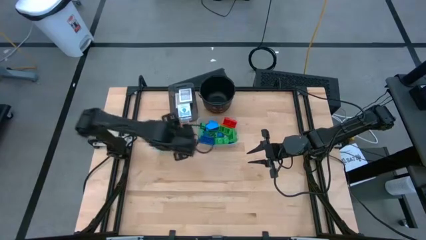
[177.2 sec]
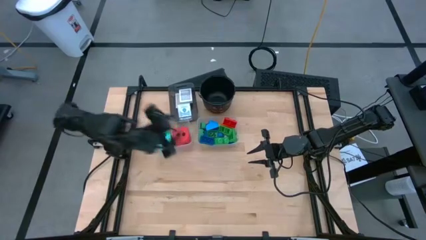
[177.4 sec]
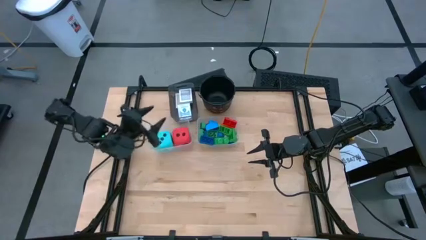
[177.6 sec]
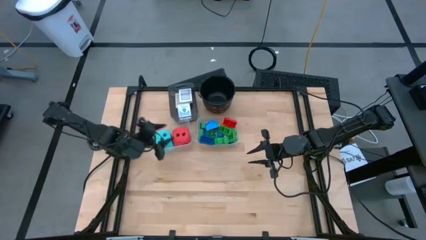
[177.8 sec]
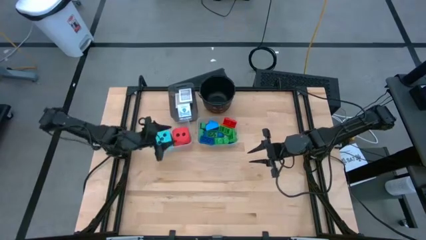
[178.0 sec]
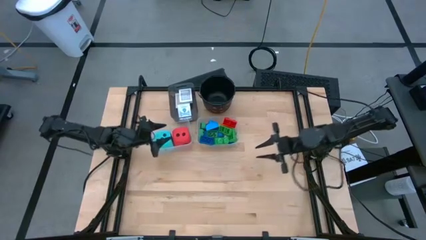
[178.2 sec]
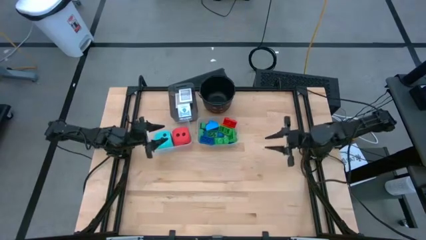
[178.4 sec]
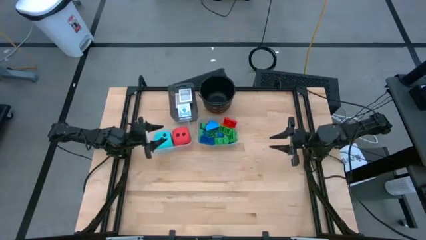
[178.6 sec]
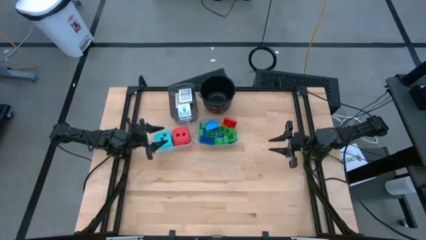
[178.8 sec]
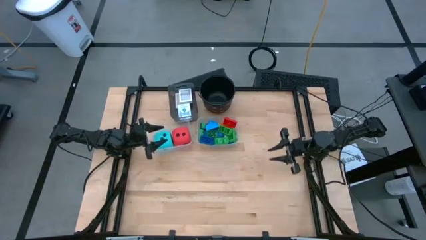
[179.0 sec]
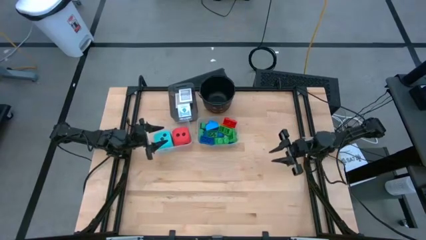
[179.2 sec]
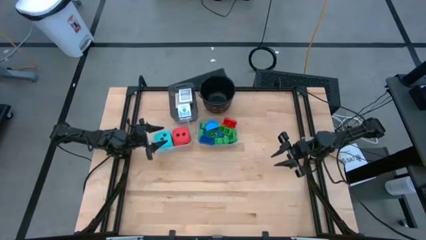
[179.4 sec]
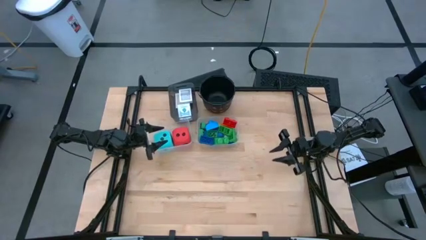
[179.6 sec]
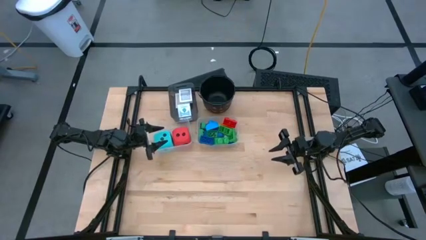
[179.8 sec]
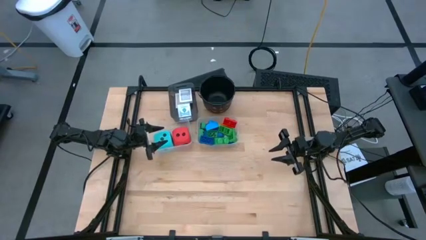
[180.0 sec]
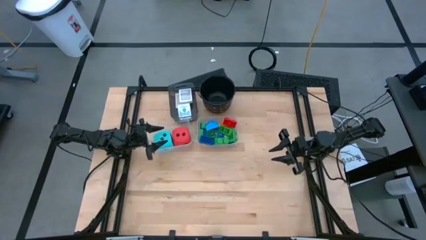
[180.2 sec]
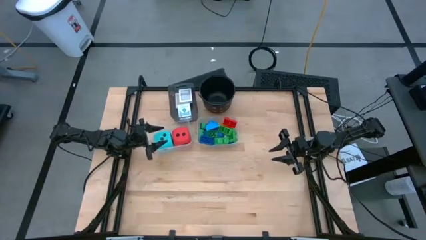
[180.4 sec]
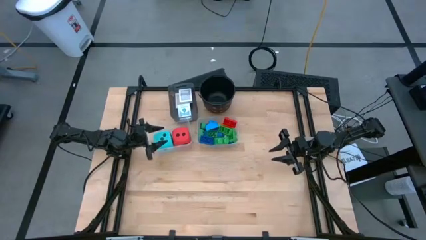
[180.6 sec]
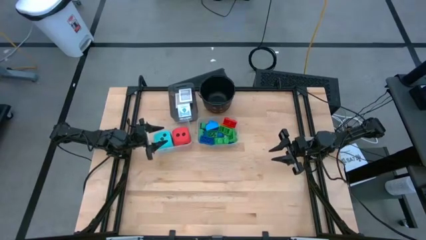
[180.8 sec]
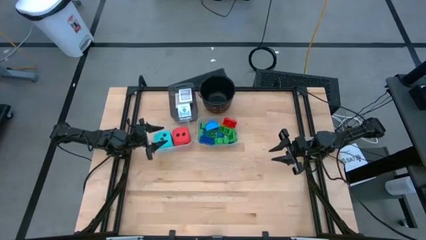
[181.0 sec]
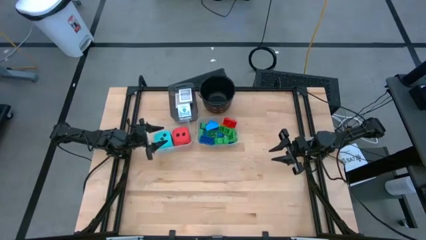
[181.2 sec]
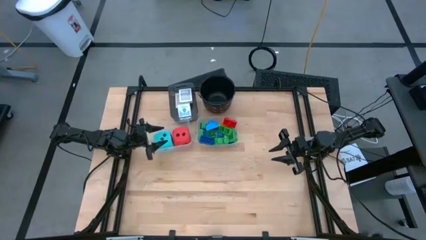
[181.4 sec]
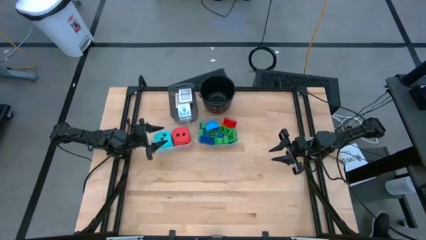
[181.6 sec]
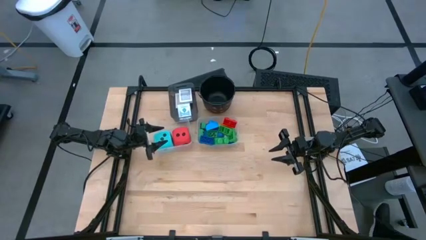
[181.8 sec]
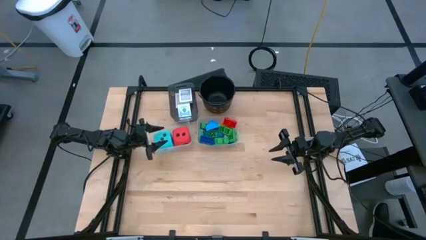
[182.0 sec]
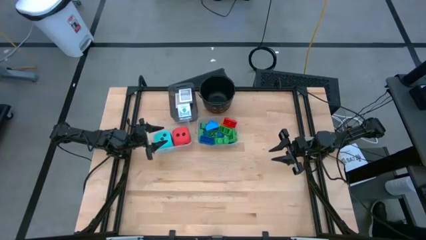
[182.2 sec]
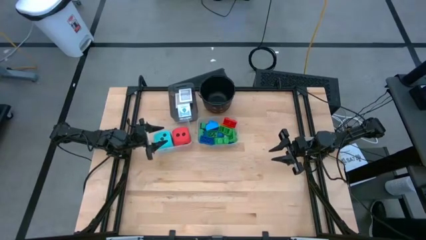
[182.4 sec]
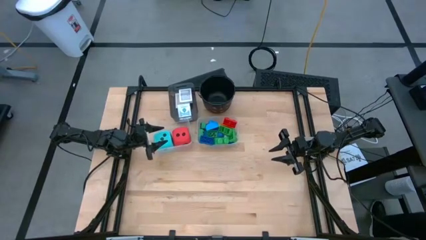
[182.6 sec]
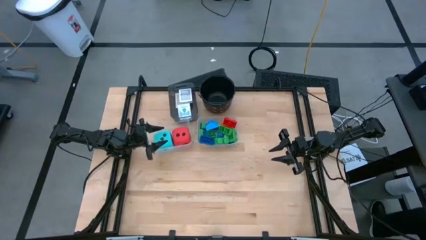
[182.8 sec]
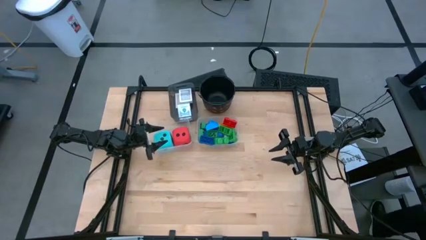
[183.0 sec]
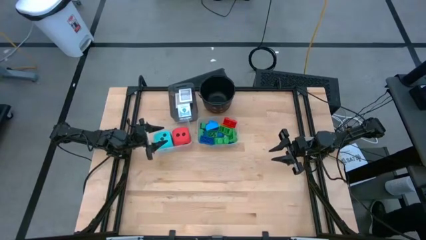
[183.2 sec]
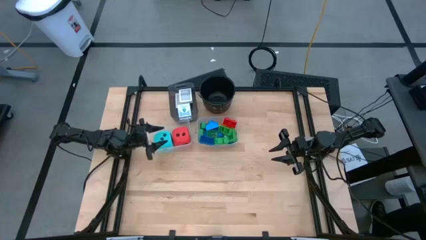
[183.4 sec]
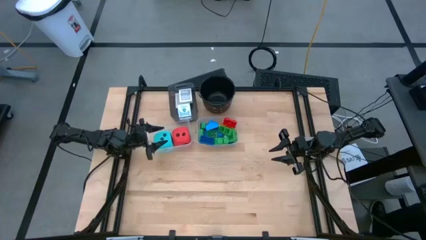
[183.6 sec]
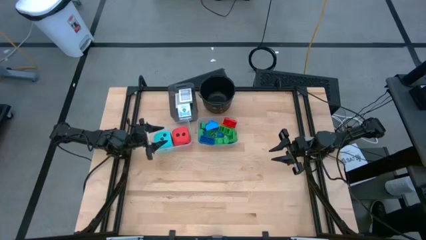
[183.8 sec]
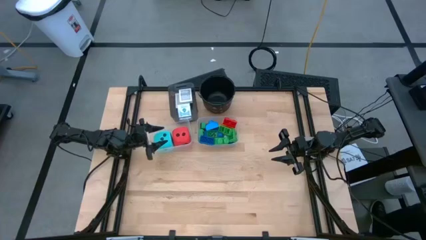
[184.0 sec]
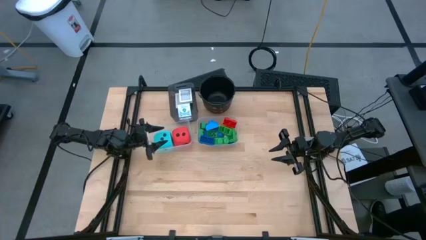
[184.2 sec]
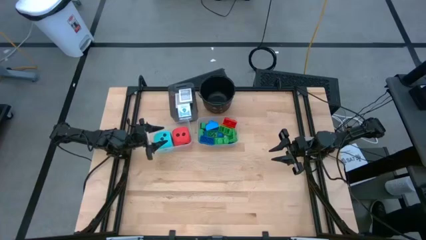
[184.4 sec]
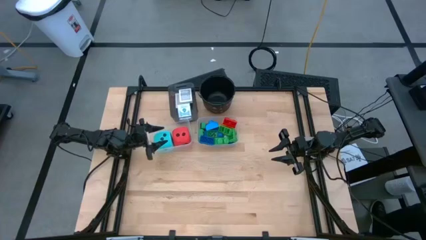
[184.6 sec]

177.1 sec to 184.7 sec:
Task: Pick & Place Toys
Return to Home Position

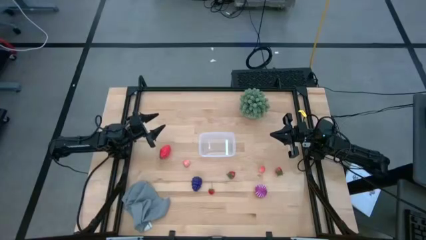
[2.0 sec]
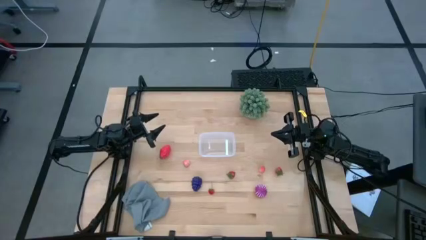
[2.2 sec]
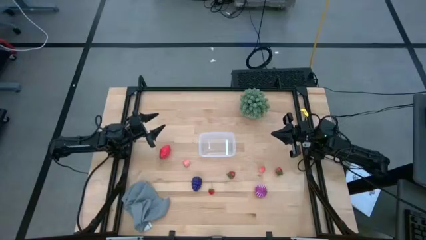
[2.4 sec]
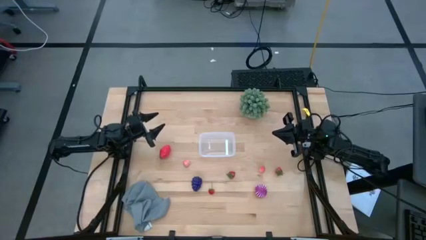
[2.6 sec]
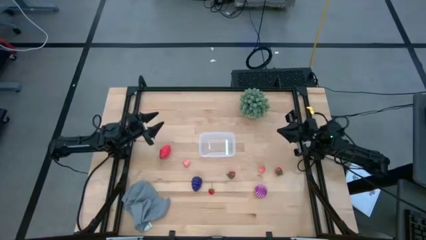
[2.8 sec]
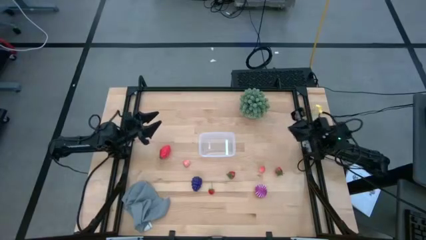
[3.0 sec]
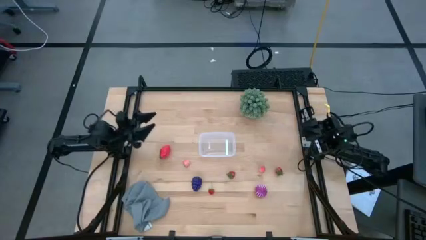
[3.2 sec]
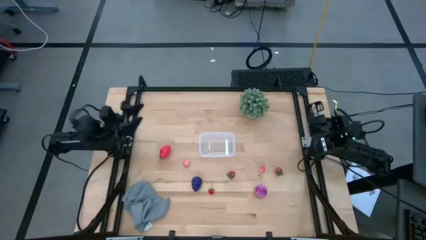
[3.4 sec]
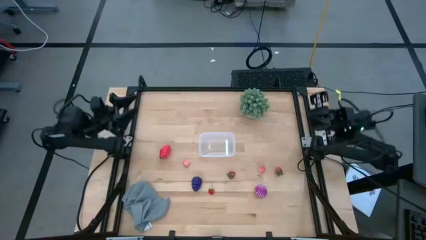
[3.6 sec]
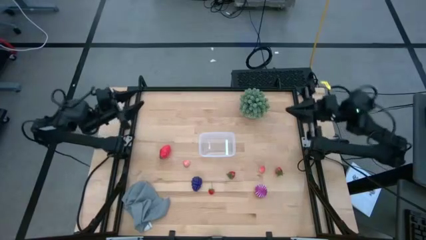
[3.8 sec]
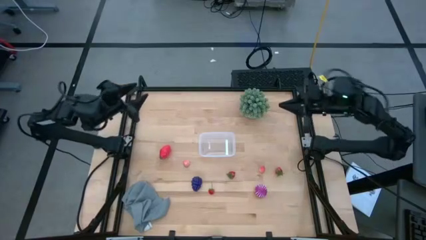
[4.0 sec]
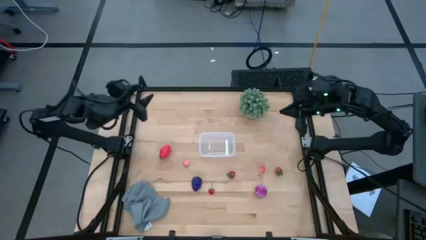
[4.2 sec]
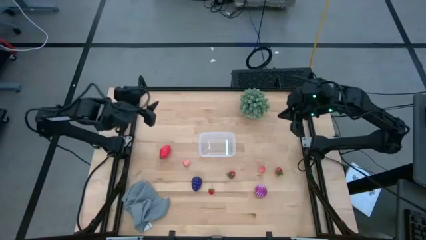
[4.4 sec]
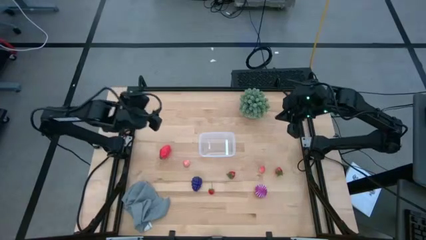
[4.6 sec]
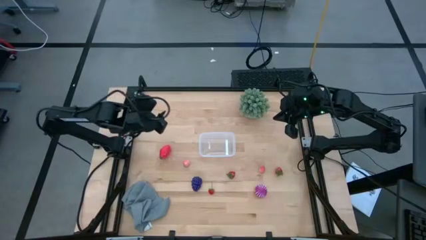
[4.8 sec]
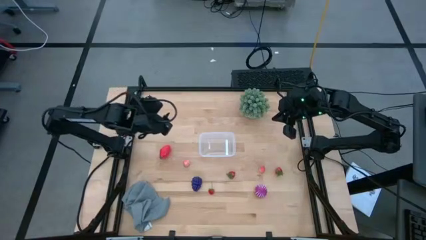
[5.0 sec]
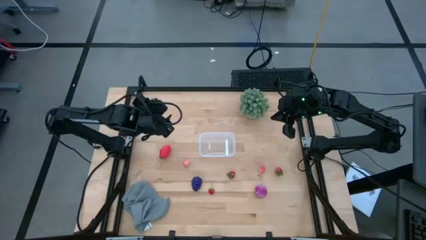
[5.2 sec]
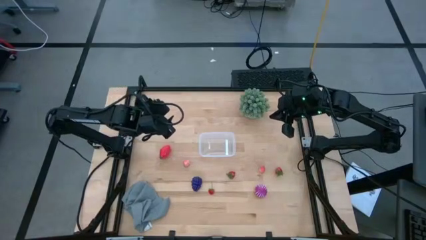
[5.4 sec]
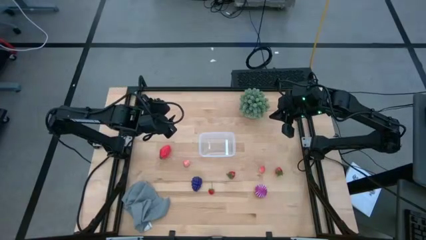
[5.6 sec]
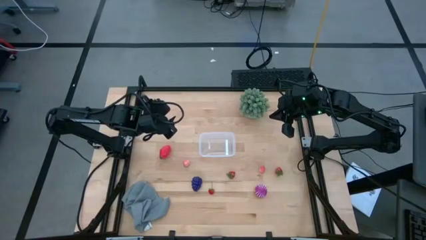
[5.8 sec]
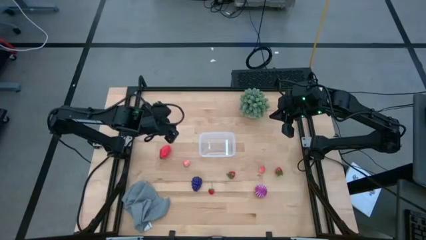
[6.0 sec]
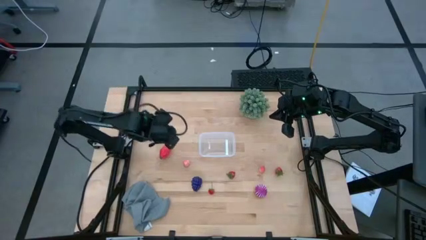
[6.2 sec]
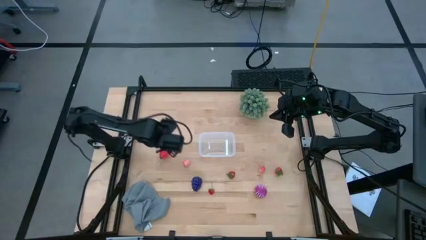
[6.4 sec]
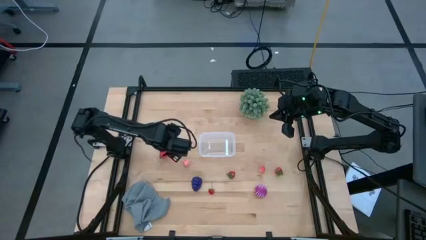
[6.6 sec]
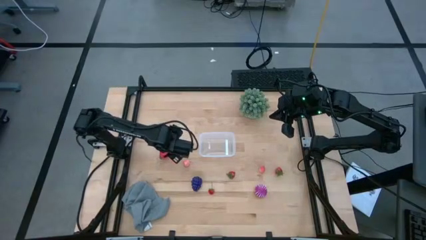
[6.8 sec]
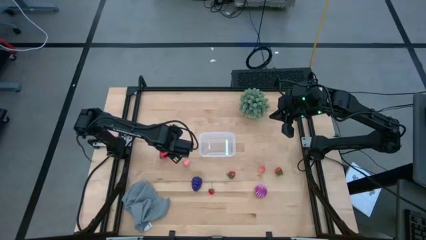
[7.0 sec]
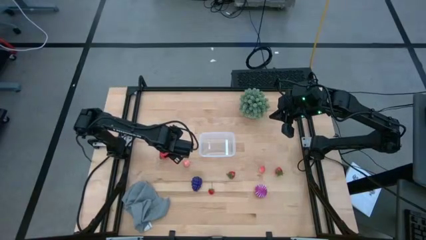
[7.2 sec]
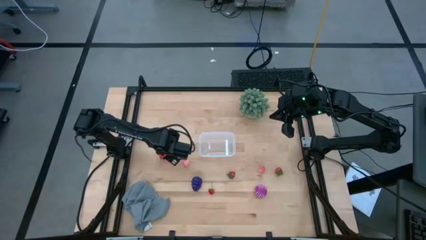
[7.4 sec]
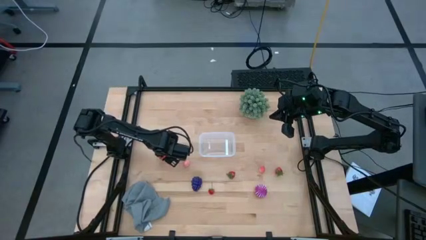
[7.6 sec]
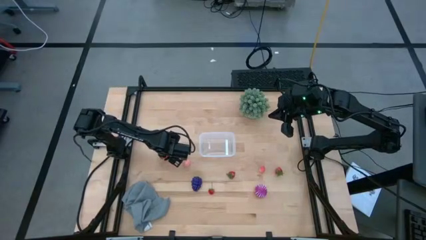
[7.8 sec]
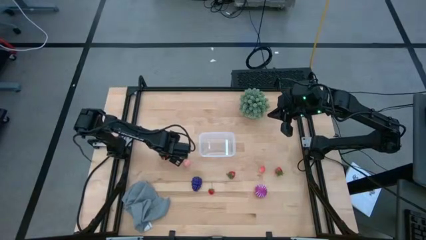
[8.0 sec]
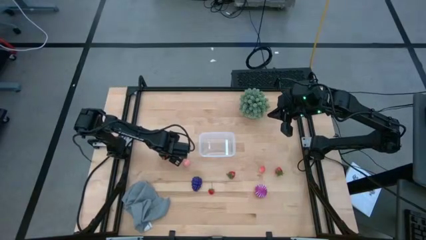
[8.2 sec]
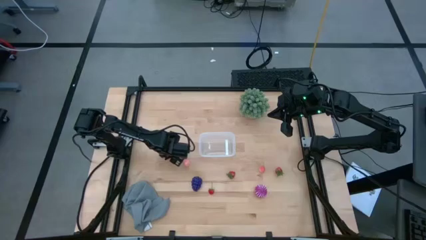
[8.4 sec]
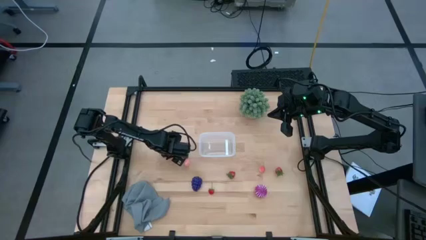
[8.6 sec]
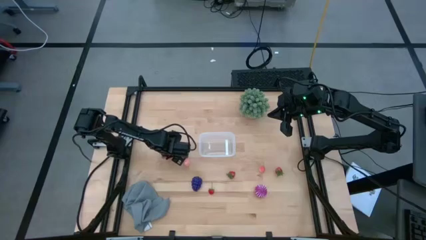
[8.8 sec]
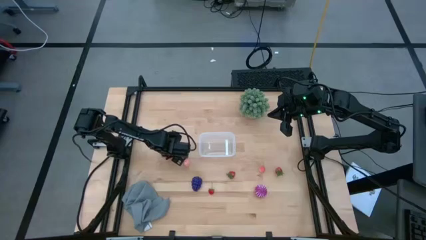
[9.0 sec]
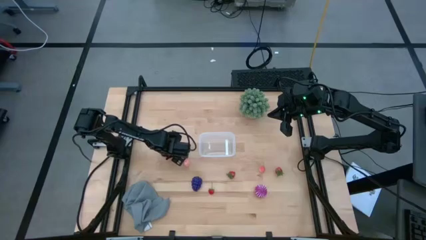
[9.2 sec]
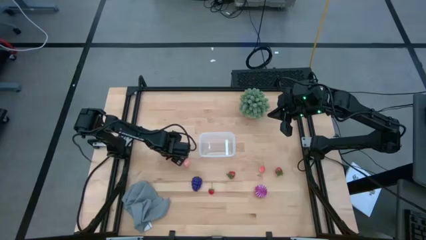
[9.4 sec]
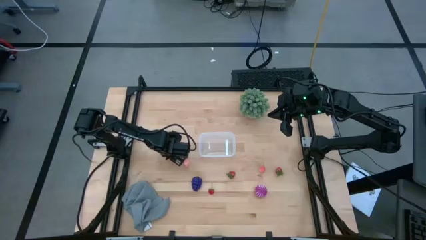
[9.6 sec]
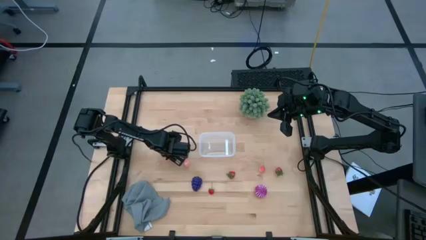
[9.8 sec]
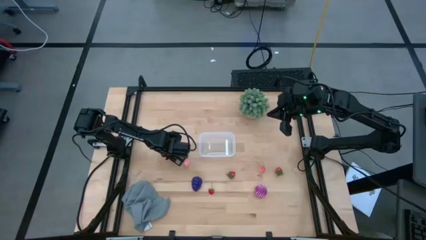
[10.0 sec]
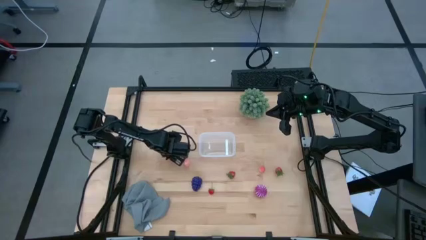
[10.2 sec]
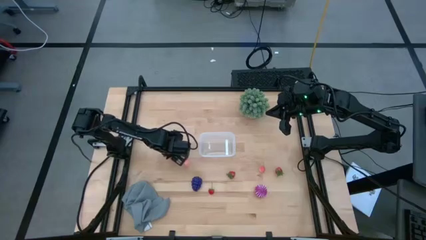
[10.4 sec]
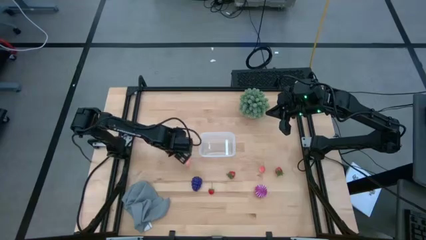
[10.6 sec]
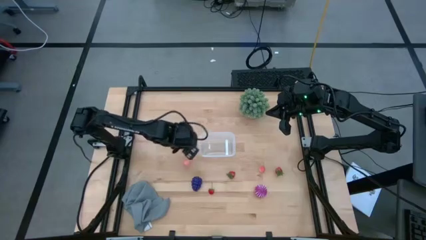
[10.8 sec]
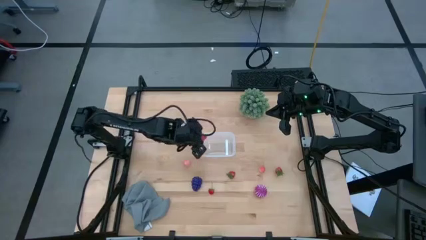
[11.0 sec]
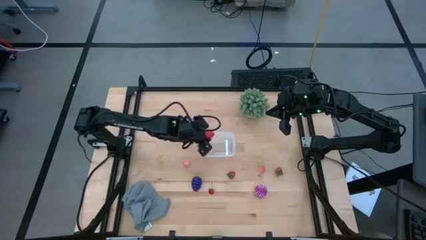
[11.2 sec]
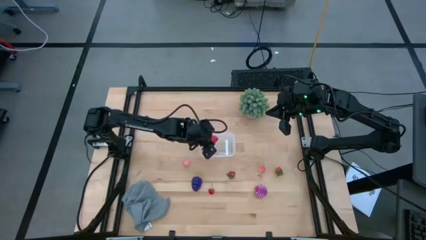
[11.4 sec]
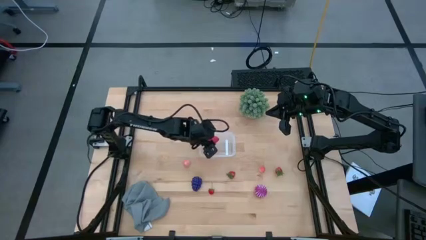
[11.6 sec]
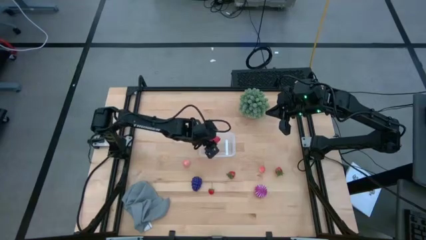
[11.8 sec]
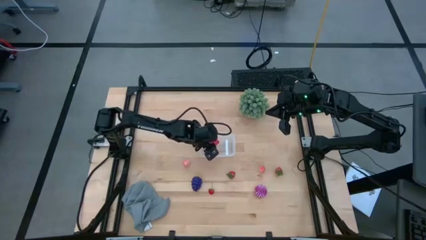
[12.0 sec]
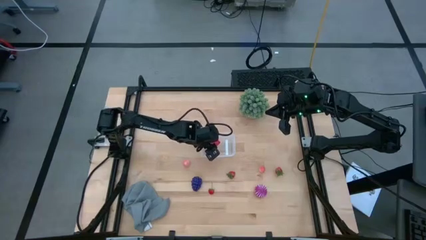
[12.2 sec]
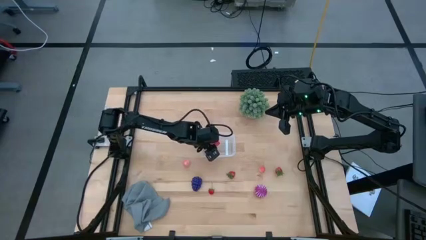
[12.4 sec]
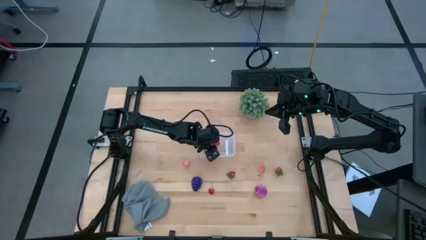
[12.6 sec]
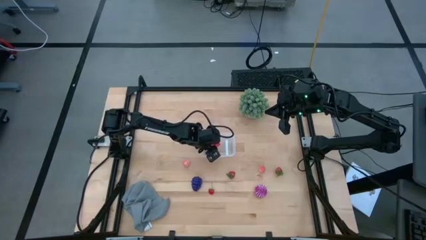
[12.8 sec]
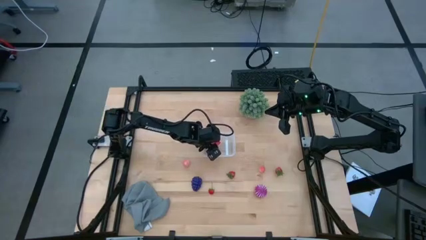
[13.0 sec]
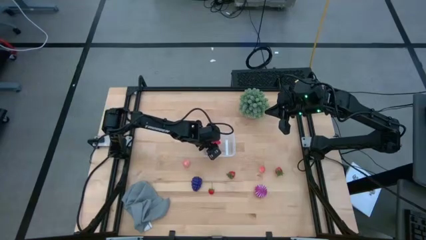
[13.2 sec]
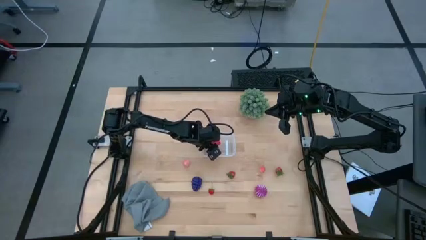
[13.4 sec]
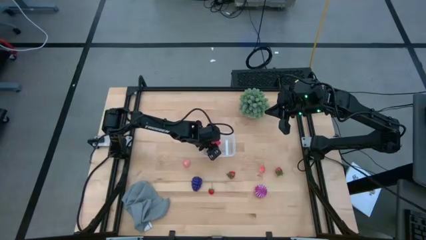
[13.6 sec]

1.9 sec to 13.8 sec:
Task: Pick and placing Produce into tupperware
Put the red dragon fruit into the transparent bin
